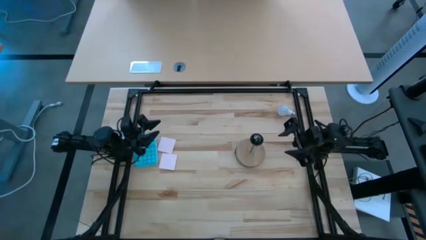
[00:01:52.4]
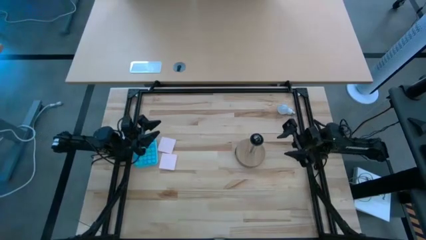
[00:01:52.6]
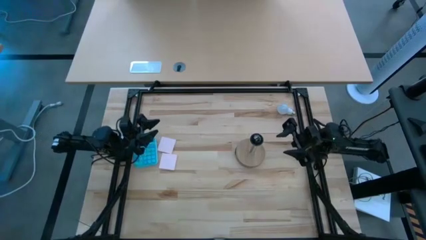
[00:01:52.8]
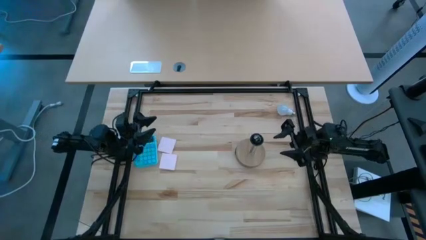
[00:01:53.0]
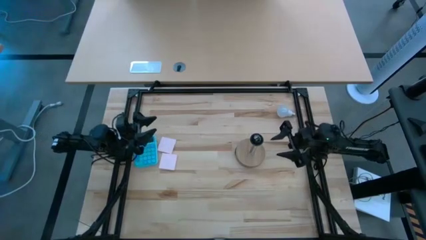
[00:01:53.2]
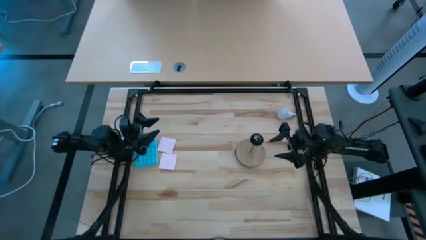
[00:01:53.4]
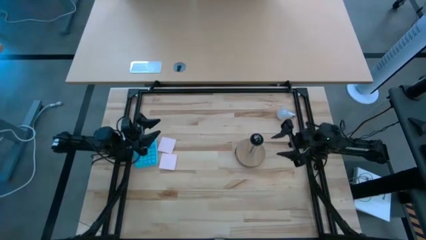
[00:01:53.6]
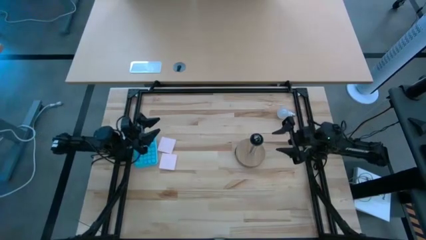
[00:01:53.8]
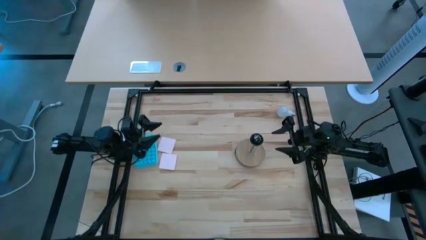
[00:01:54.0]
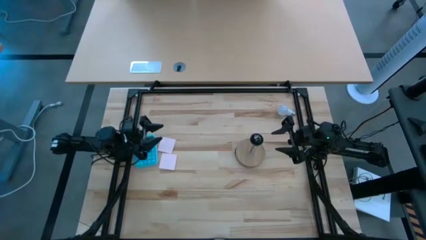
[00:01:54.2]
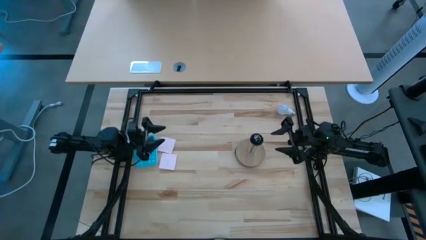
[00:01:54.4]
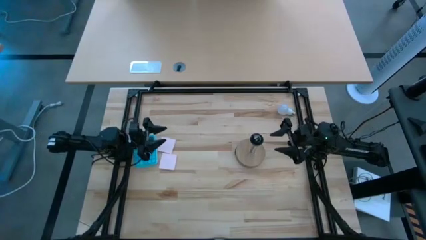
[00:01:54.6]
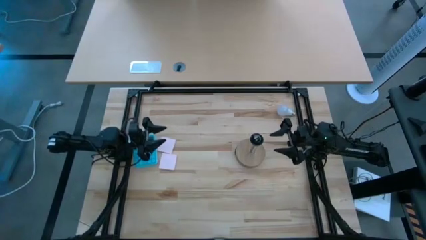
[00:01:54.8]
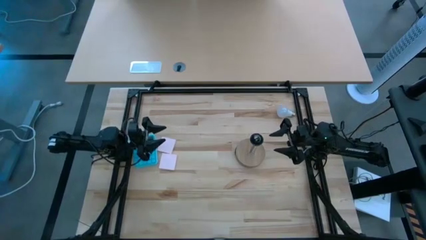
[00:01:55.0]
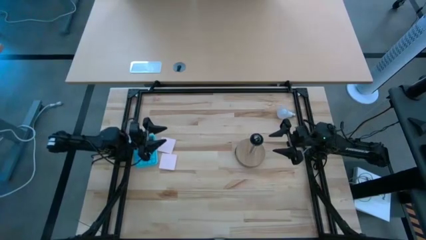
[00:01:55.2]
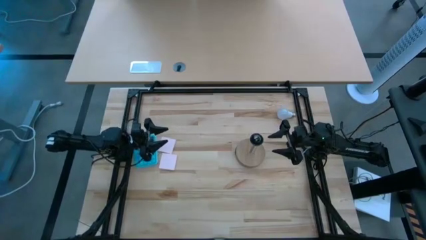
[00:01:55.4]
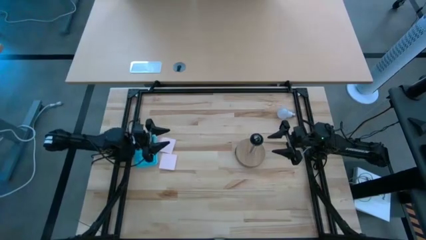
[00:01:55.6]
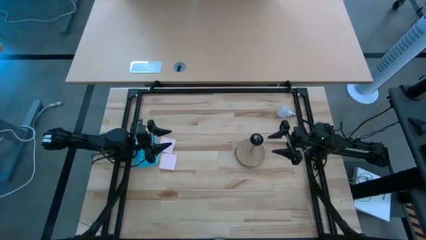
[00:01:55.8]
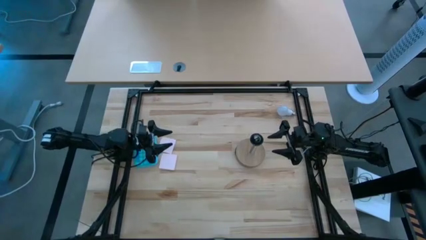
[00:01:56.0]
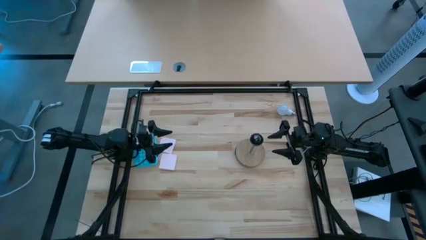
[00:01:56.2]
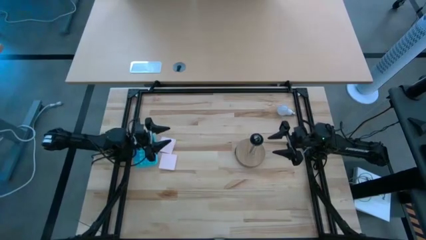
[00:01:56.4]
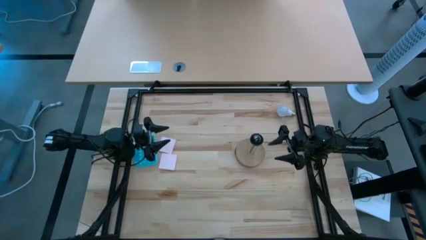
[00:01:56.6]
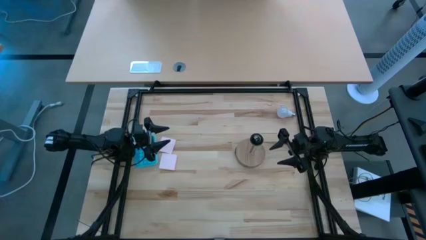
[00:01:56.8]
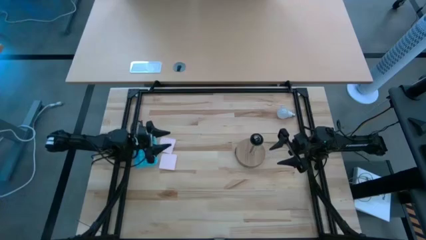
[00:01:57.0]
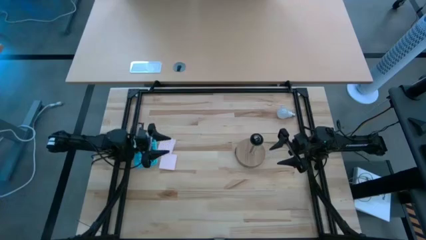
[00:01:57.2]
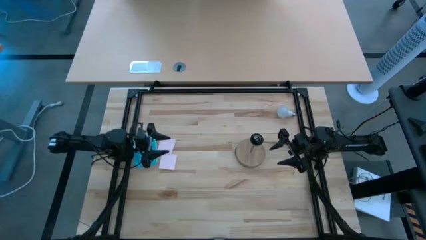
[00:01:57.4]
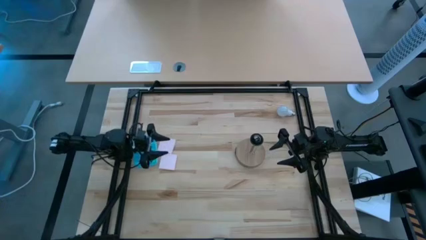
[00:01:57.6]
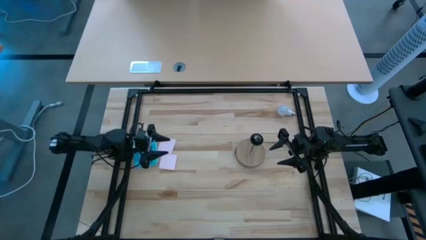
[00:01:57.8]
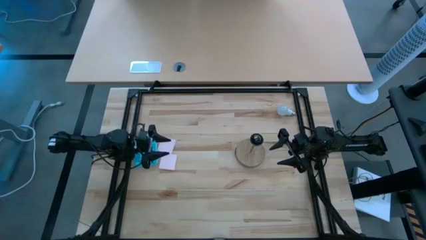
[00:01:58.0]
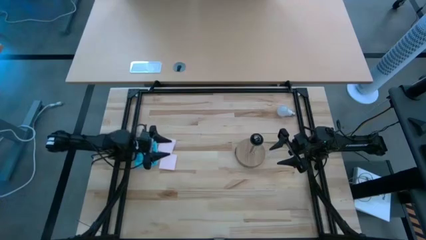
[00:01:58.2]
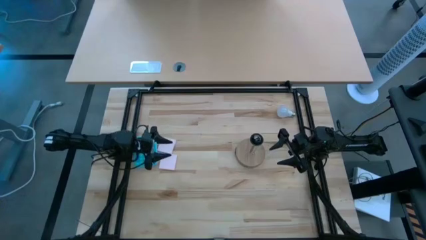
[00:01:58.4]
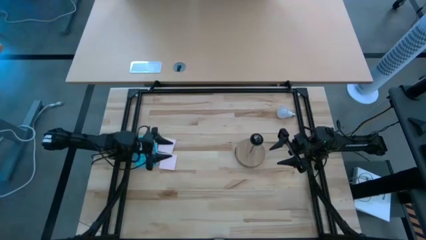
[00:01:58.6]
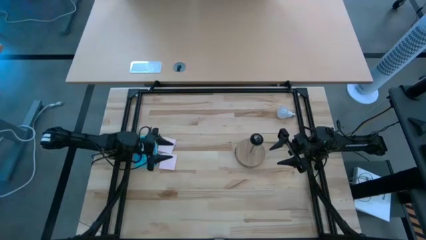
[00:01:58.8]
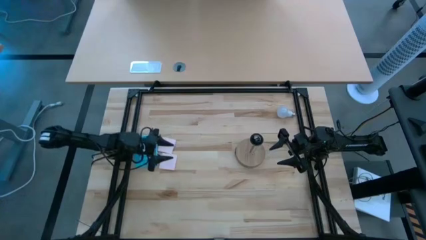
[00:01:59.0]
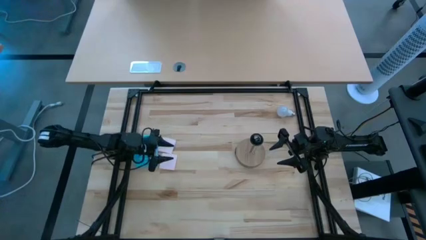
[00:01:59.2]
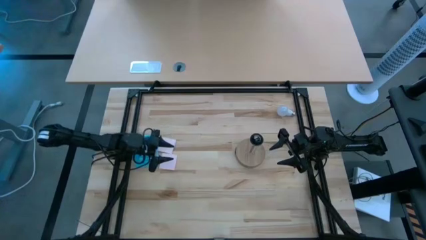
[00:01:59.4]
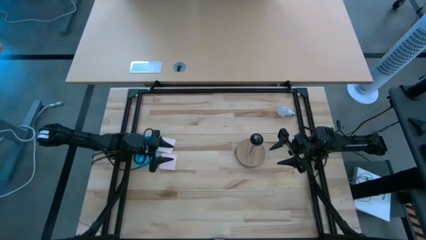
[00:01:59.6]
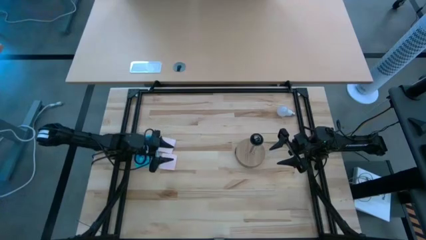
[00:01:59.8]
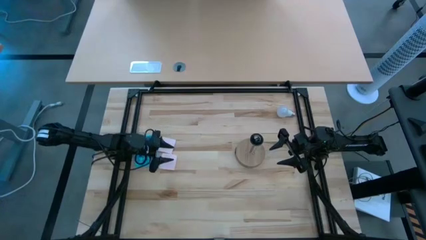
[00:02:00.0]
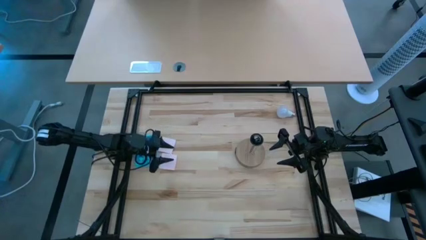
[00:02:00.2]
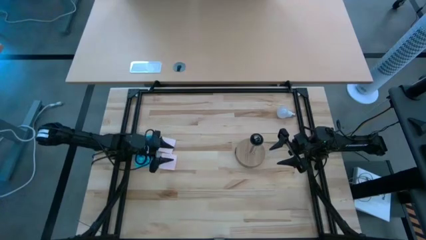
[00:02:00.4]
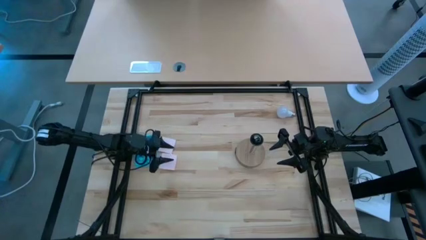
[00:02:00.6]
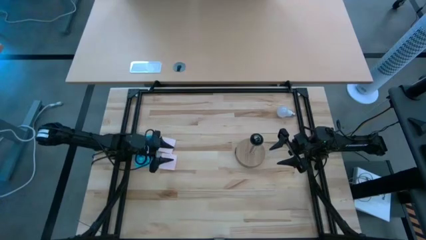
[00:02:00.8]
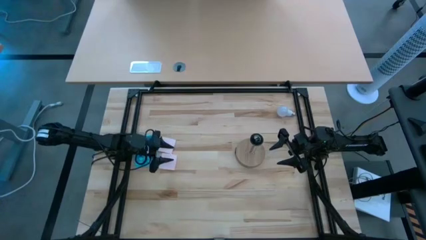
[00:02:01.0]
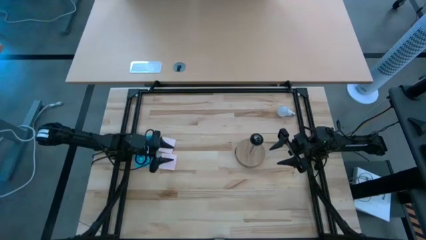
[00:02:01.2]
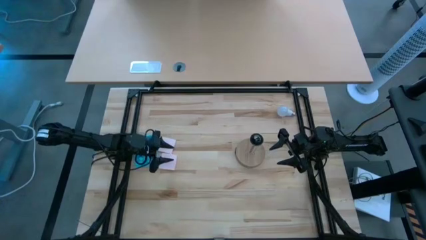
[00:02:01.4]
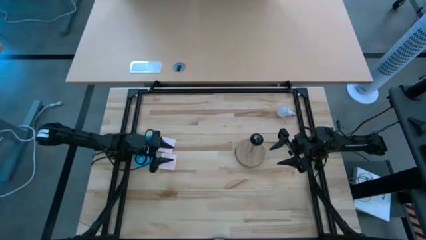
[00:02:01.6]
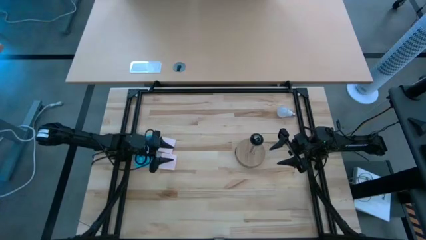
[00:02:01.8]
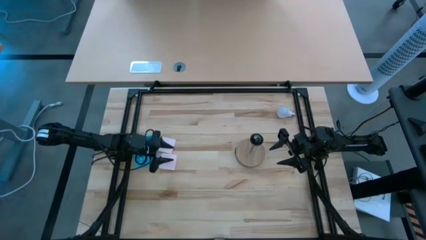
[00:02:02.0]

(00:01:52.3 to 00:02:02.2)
Task: Screw lightbulb
Return to Home Position
